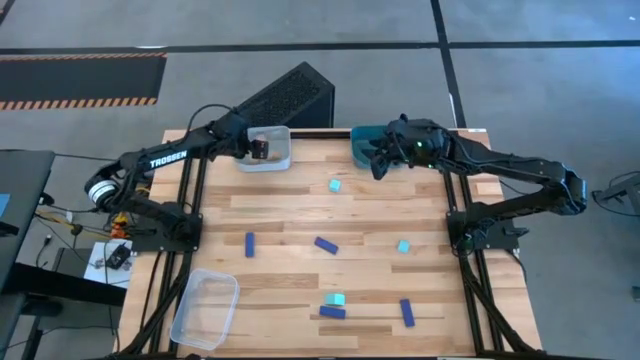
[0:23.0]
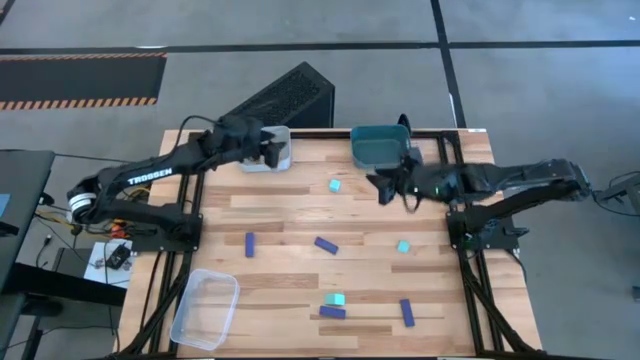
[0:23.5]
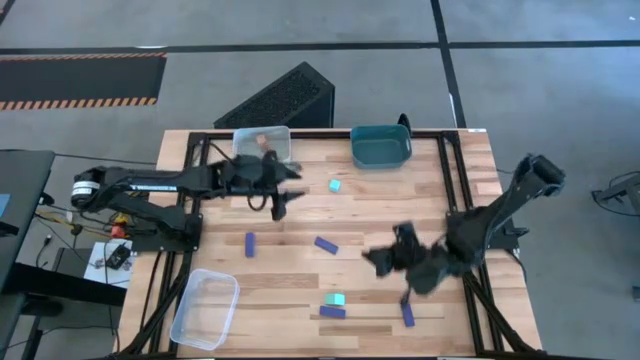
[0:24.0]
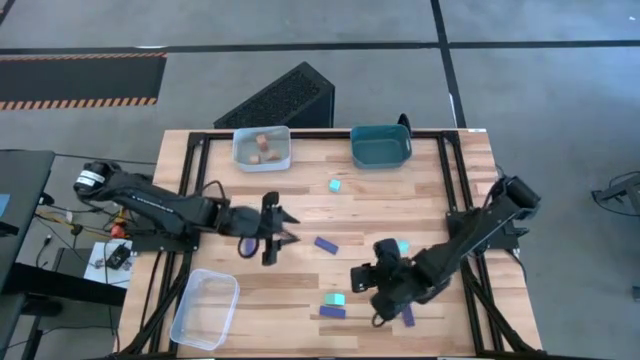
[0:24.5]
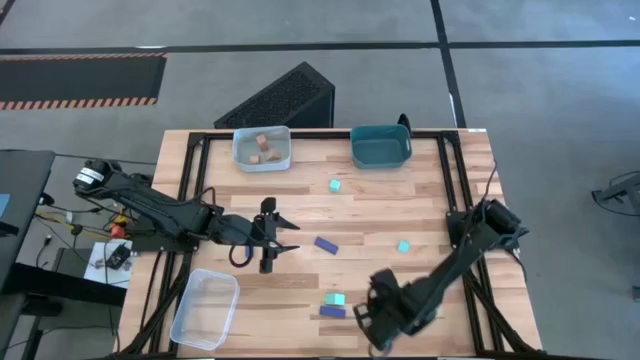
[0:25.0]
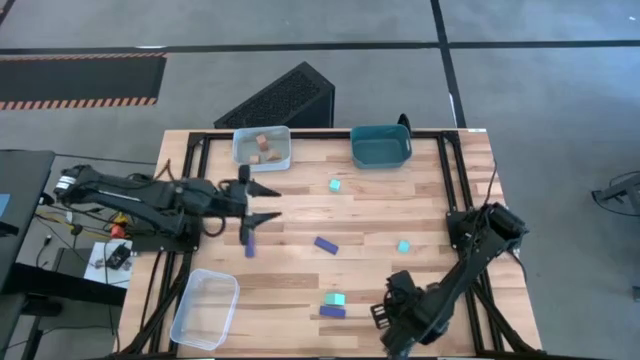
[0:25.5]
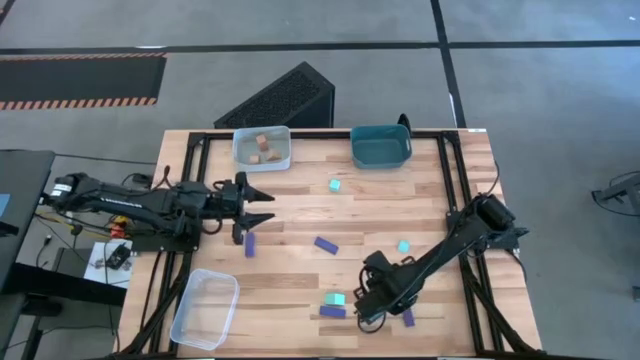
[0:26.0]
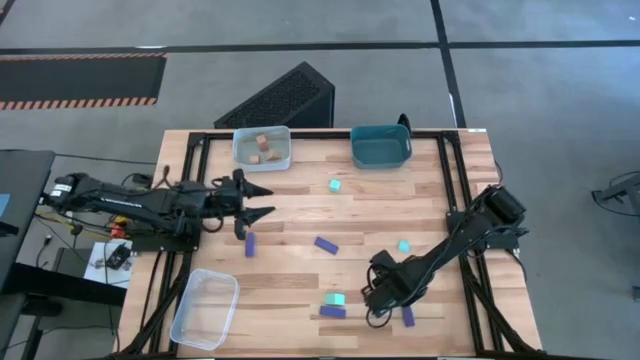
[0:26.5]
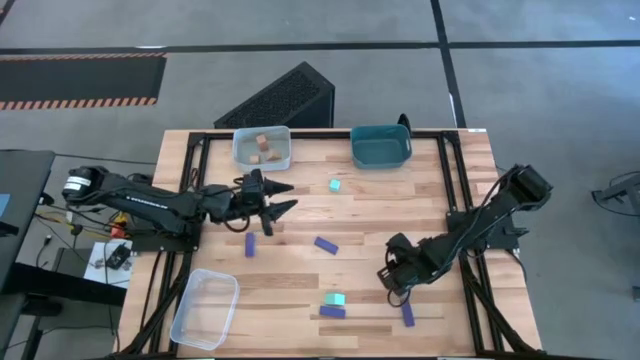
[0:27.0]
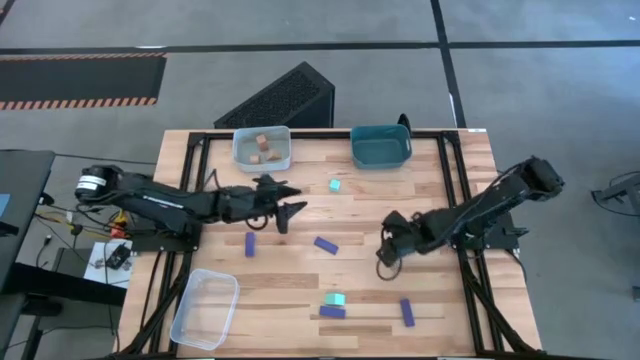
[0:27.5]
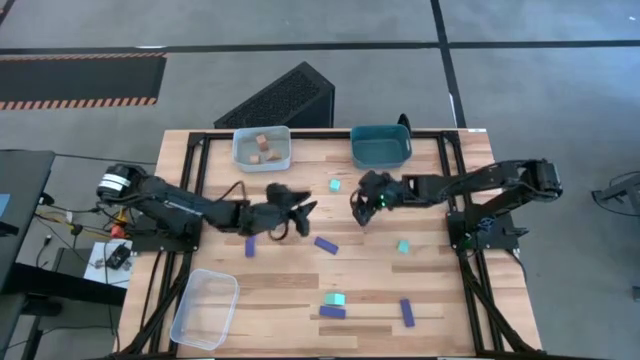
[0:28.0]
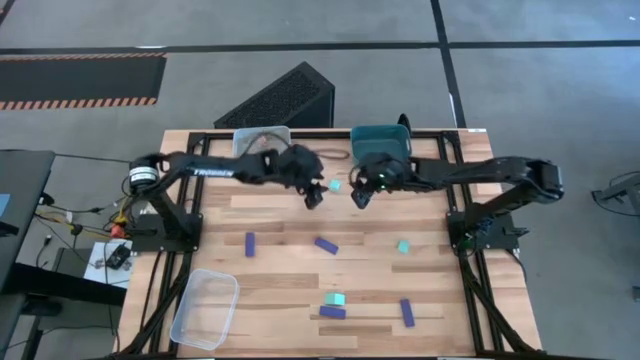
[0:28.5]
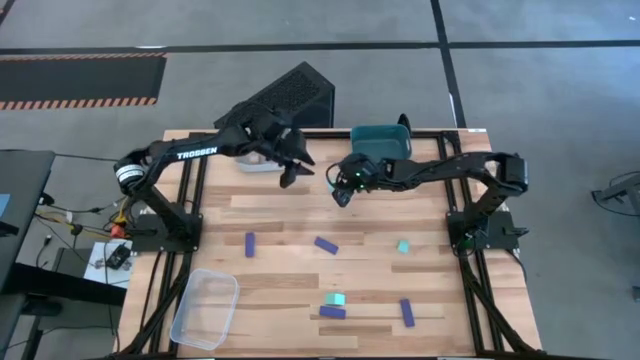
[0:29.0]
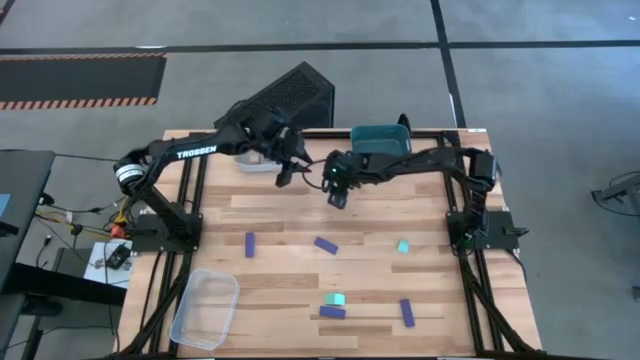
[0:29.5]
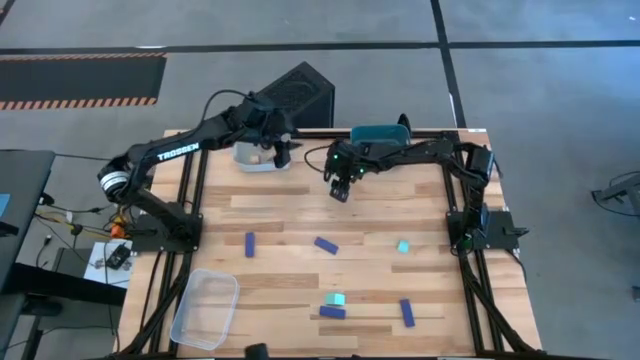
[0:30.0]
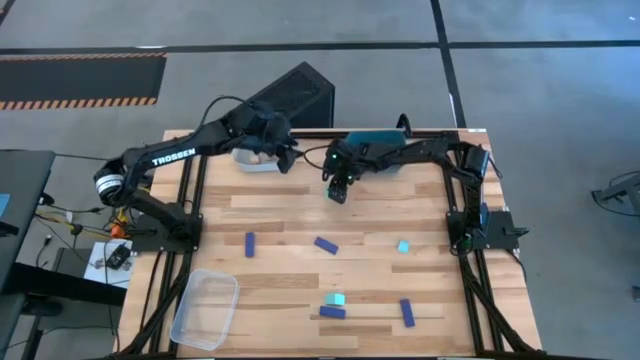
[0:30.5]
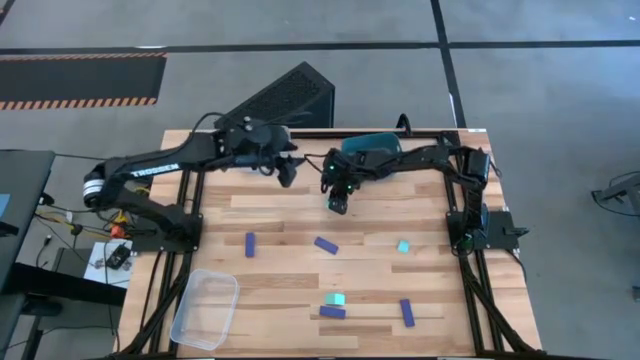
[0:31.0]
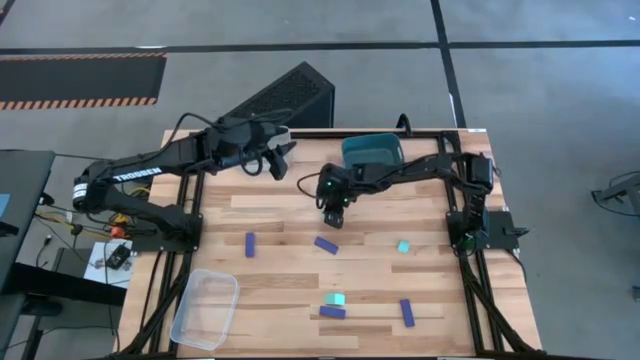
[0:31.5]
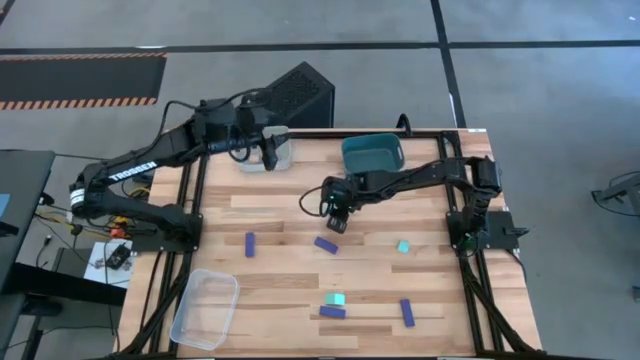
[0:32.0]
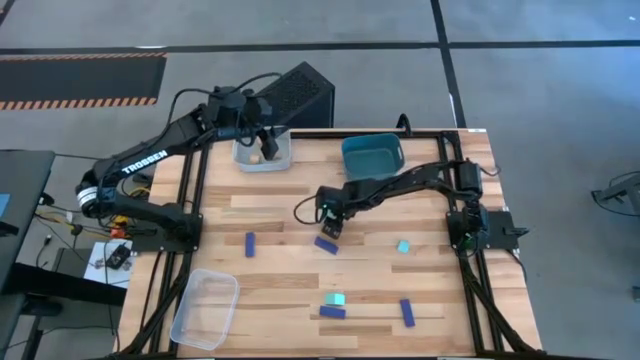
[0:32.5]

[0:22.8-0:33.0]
Task: Sort & place blocks by color
Put the top left blue block into the blue bin

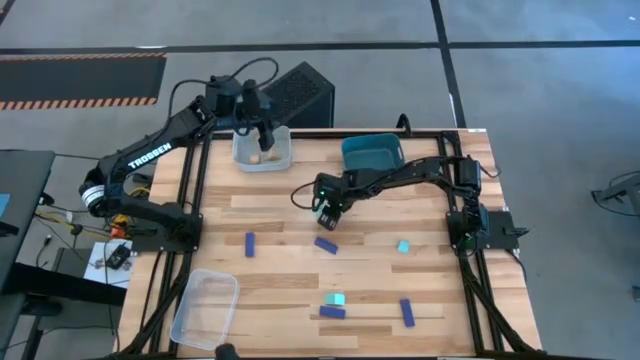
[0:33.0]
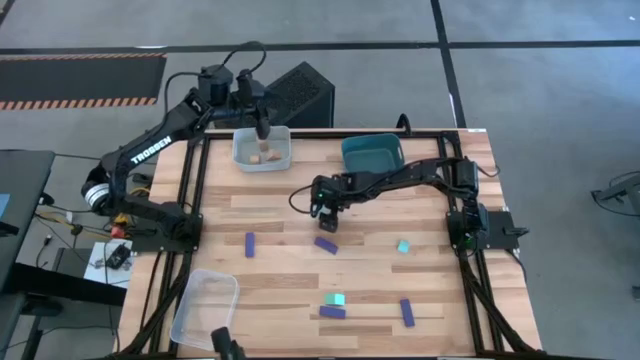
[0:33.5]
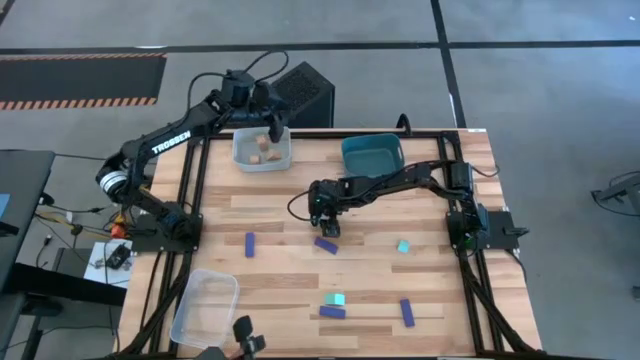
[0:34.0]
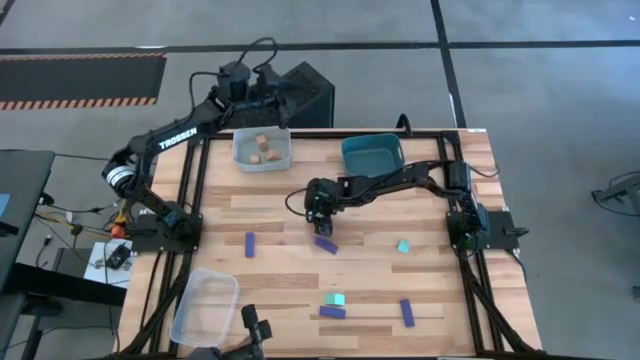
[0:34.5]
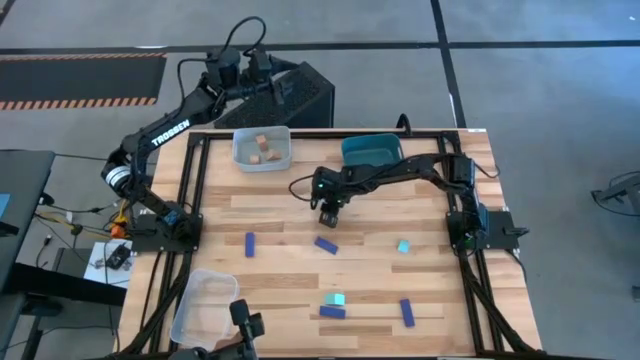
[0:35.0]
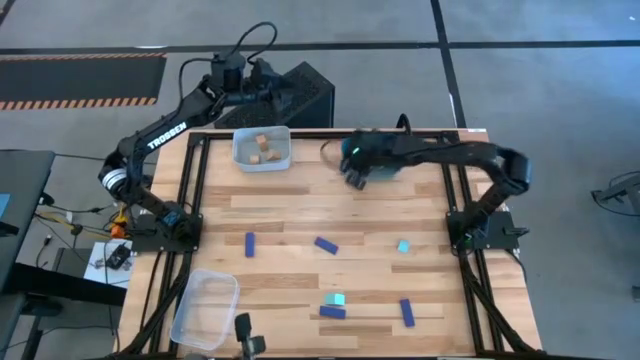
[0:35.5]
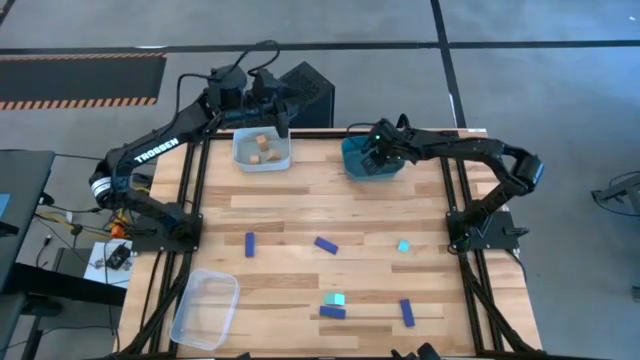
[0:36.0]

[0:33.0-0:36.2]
Put the top left blue block into the blue bin

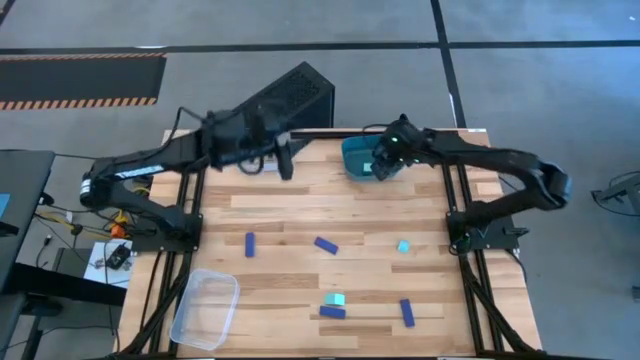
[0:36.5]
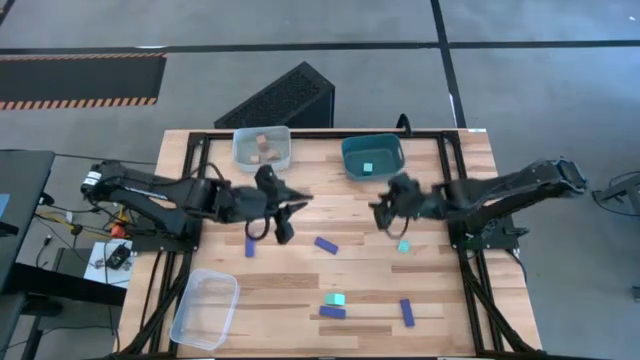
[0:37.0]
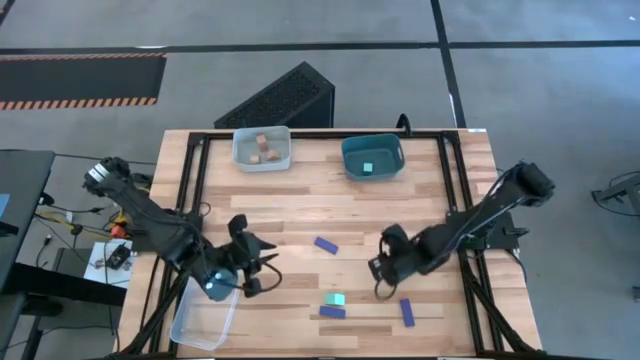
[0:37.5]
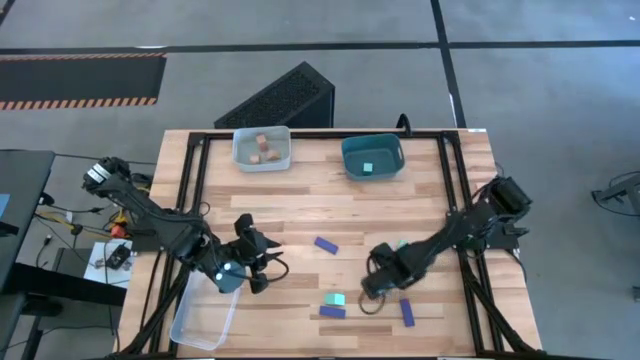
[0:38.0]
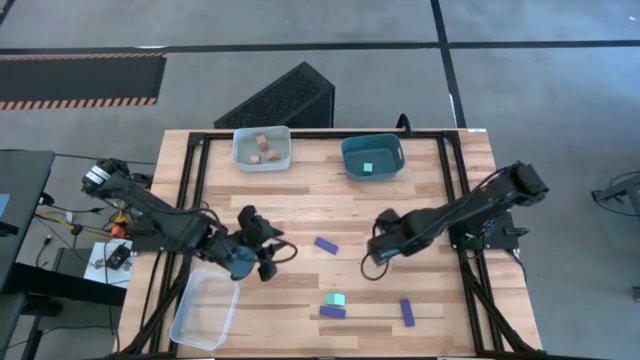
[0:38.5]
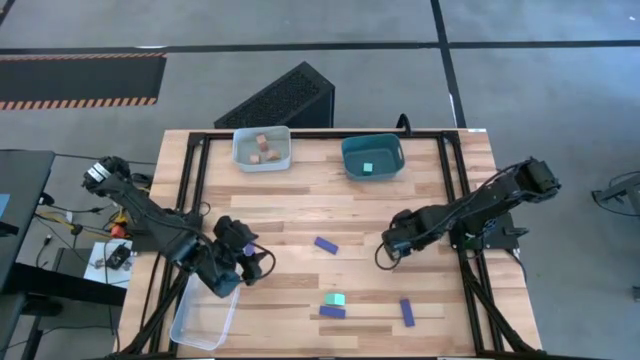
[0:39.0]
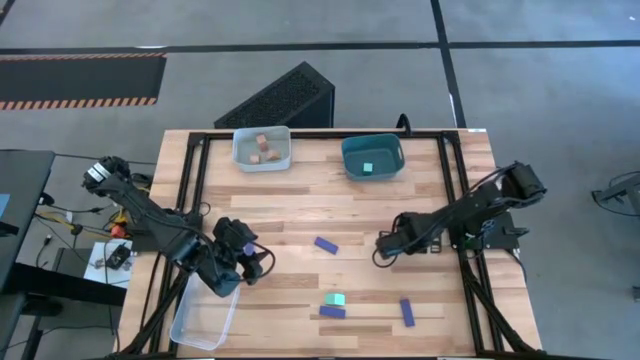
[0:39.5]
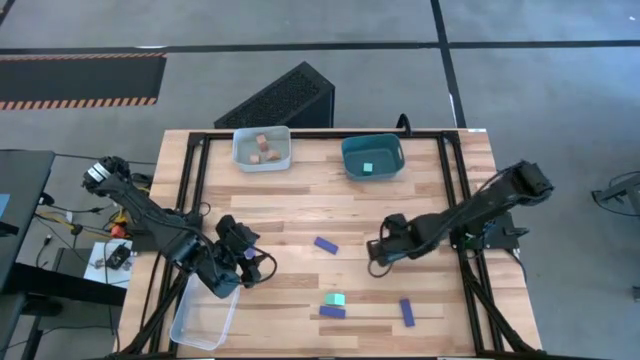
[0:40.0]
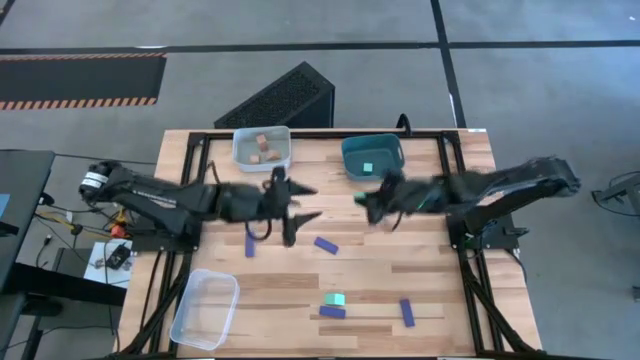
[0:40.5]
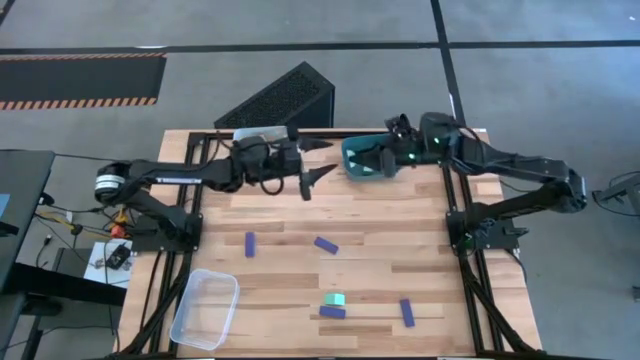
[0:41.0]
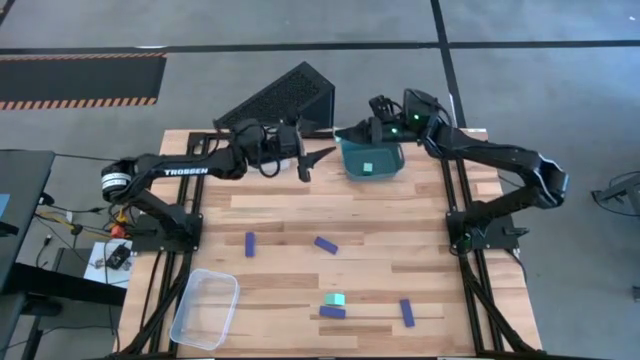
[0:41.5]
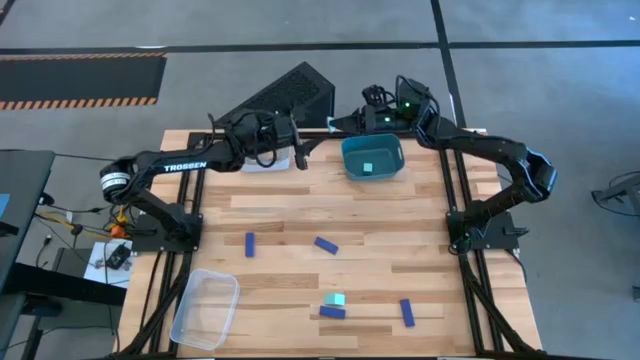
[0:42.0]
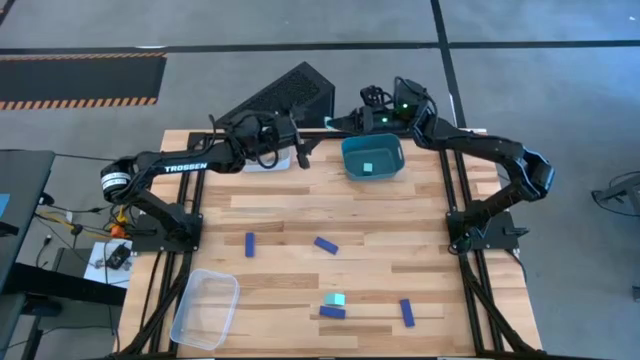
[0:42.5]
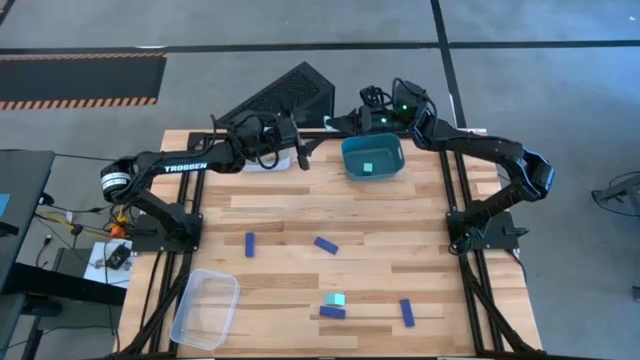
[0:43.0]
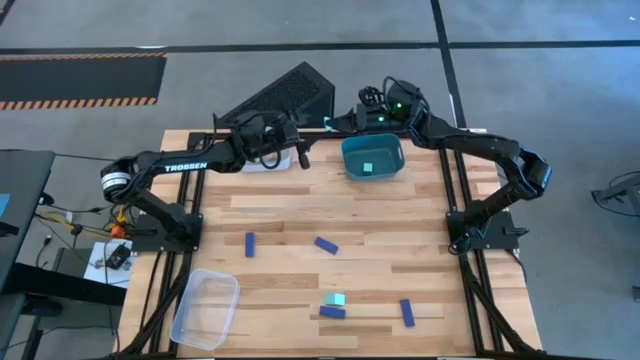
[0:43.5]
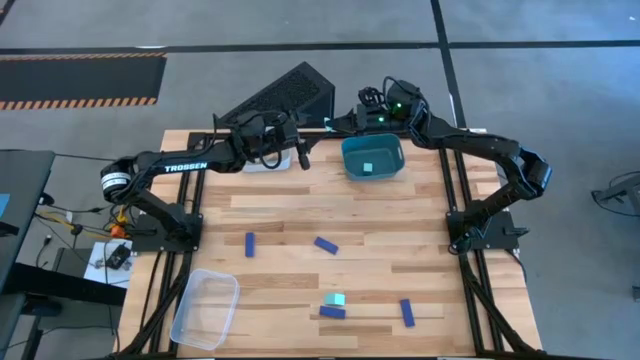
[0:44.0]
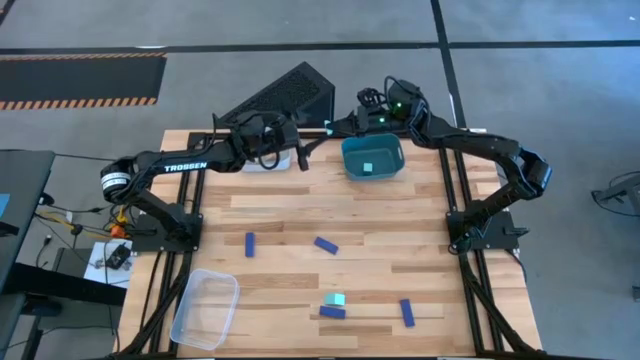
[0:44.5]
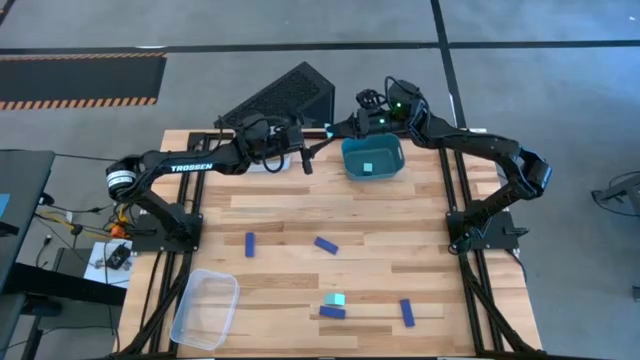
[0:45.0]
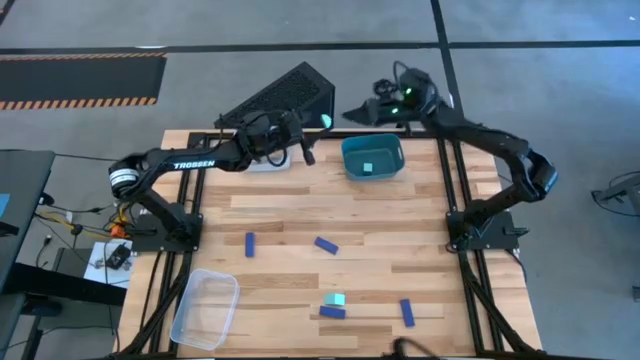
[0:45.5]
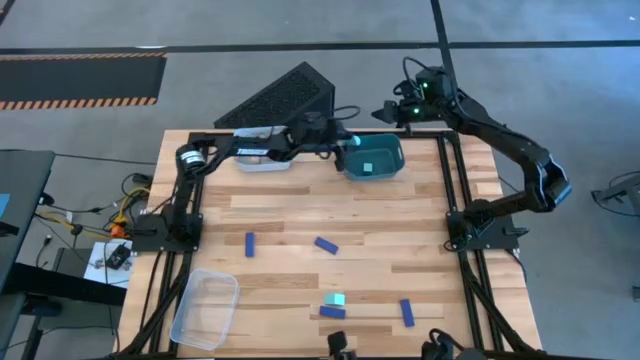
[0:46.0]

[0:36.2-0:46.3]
Put the top blue block into the blue bin
